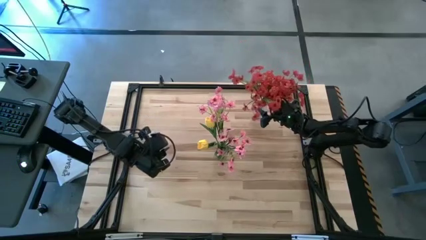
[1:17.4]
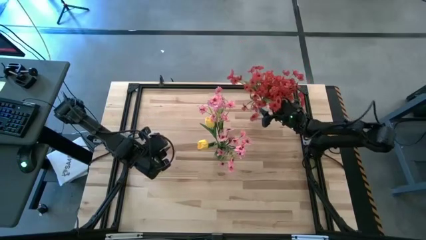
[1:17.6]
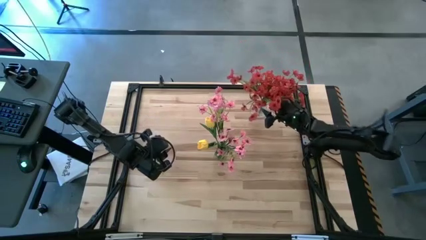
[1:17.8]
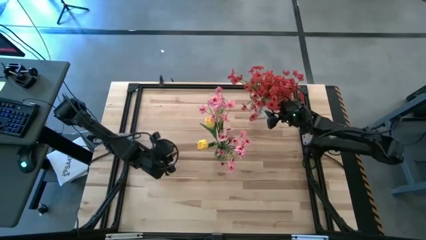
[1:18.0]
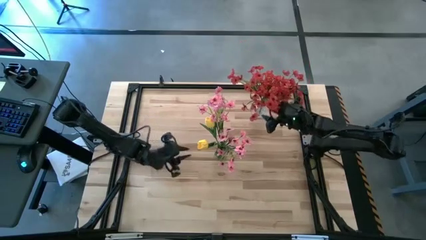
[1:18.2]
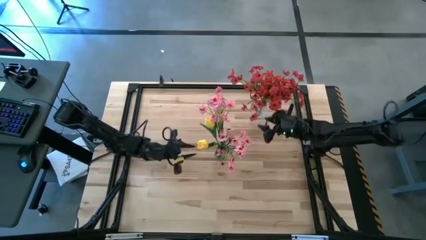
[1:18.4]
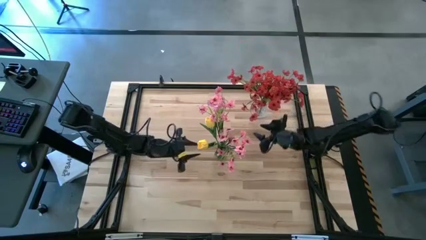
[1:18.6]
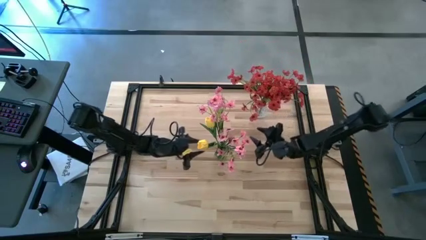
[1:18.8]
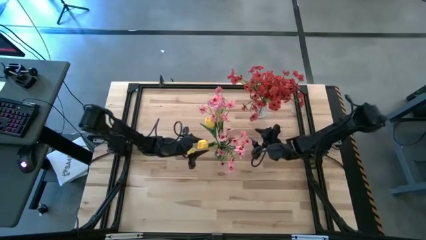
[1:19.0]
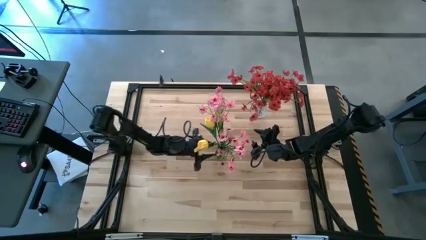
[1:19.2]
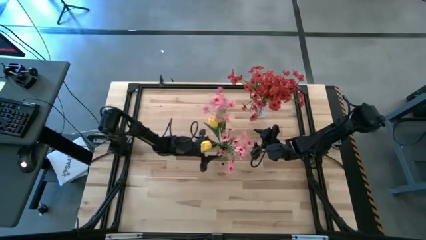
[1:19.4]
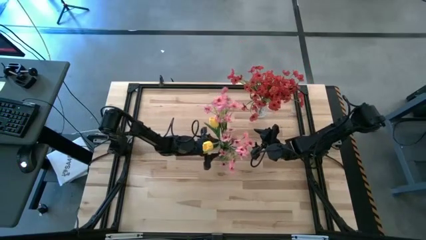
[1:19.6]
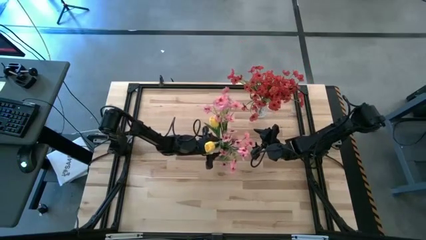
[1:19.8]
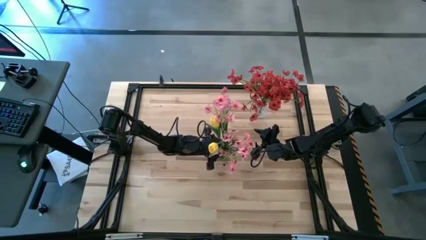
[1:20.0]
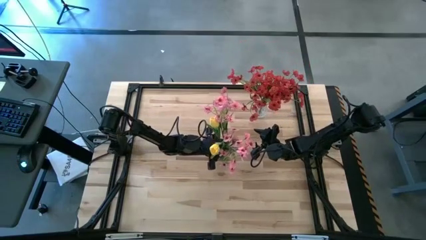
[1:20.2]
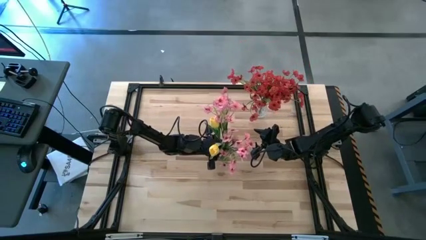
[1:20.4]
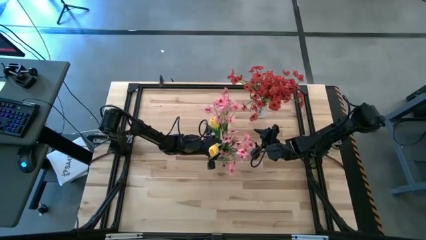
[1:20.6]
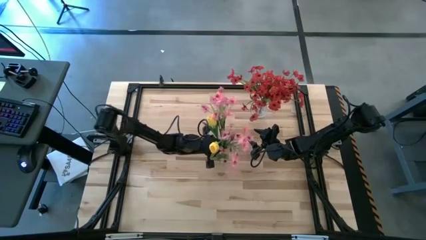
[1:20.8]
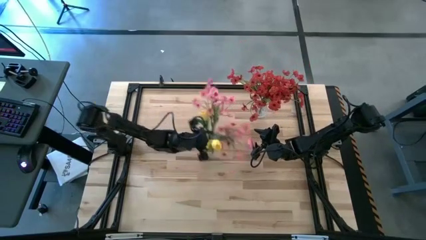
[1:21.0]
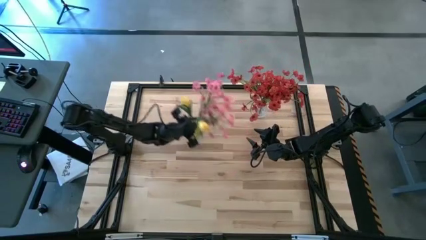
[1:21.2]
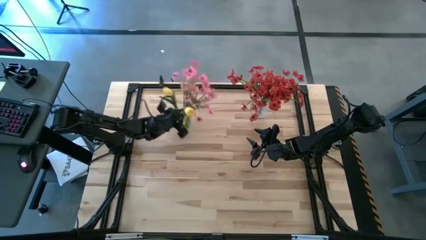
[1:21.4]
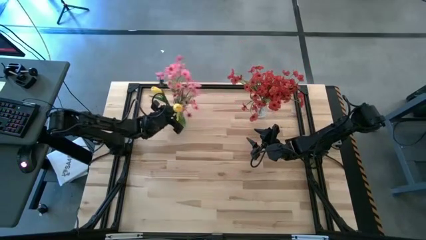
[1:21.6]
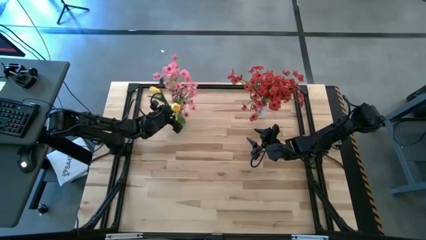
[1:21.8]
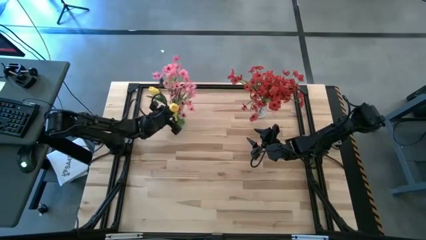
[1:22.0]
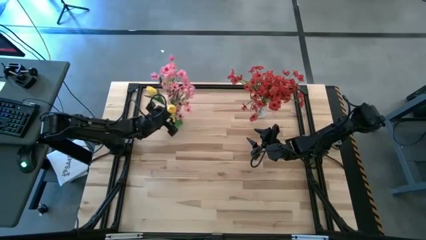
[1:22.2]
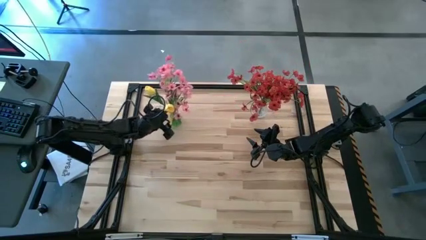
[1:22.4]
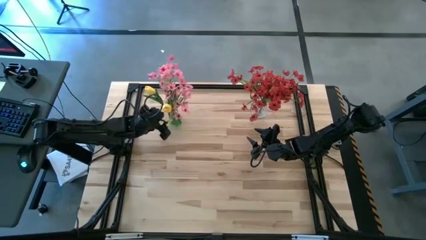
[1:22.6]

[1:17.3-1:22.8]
Task: Sort flowers into vase by color
Move the green vase to the top right of the table

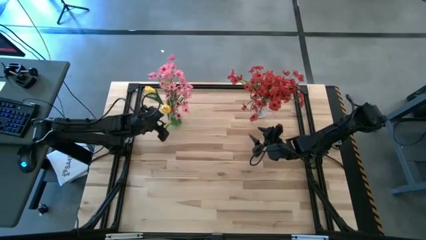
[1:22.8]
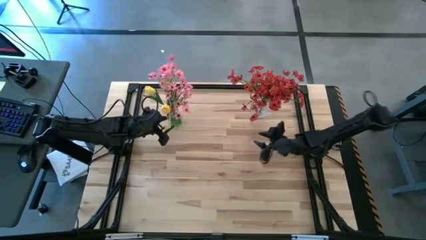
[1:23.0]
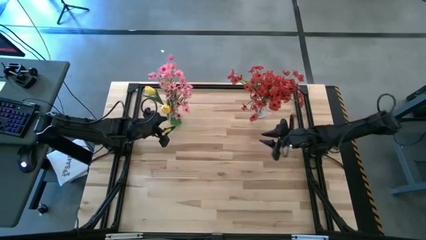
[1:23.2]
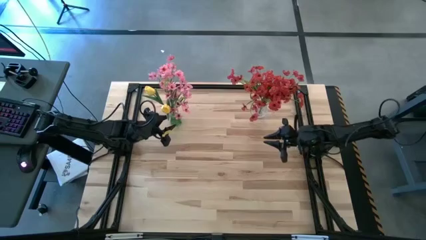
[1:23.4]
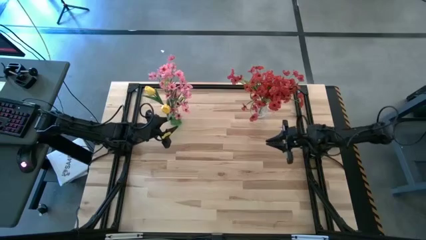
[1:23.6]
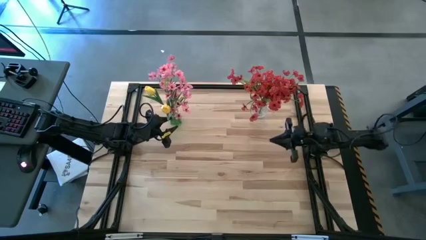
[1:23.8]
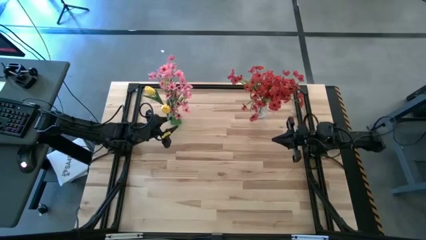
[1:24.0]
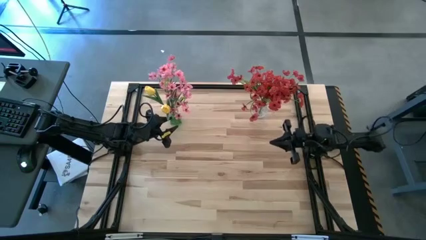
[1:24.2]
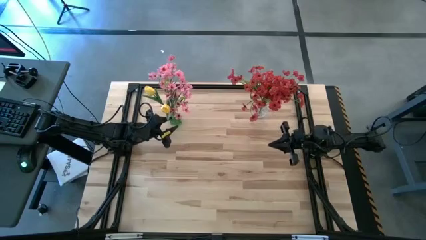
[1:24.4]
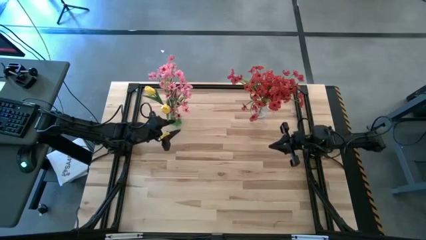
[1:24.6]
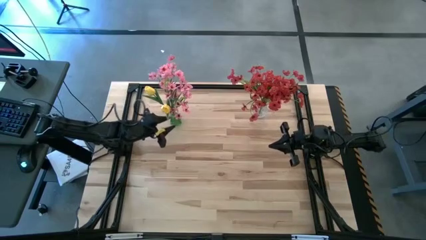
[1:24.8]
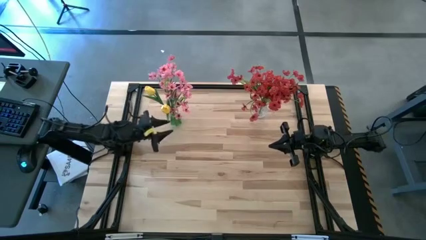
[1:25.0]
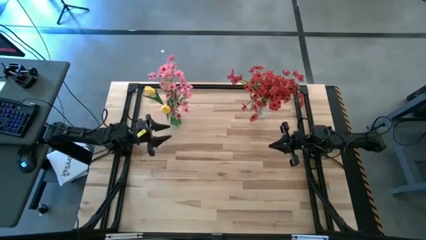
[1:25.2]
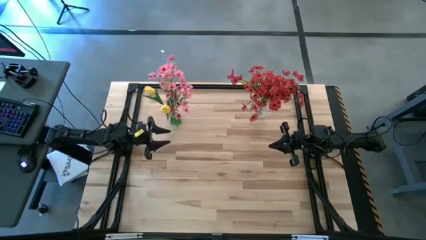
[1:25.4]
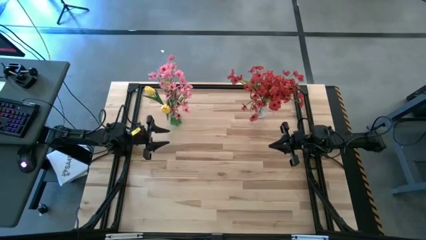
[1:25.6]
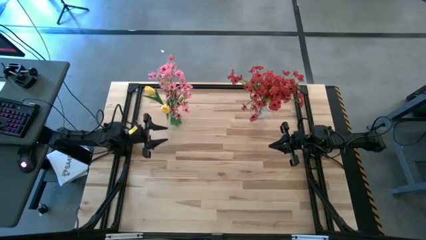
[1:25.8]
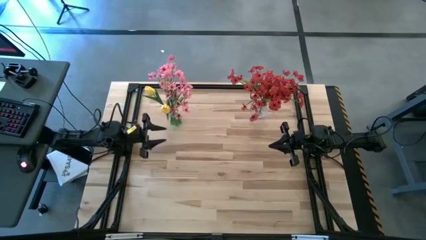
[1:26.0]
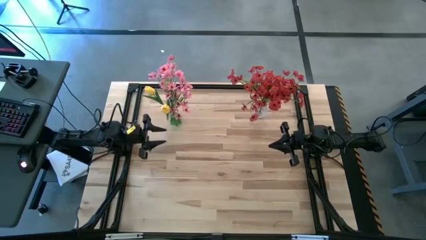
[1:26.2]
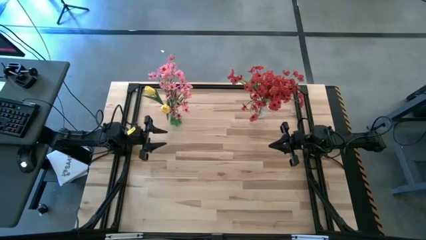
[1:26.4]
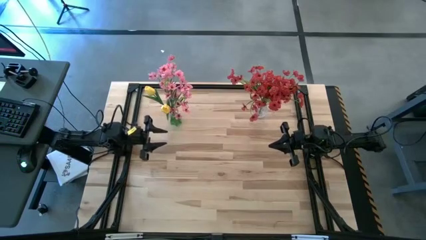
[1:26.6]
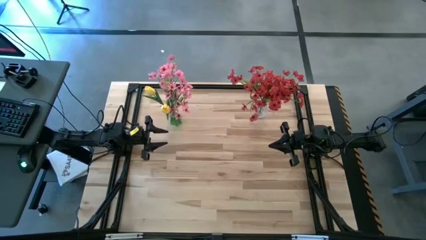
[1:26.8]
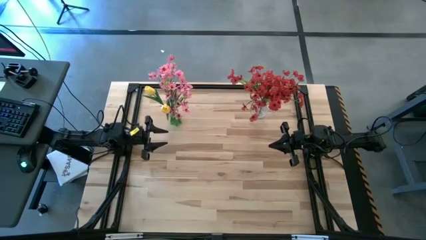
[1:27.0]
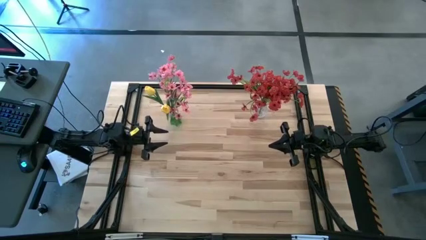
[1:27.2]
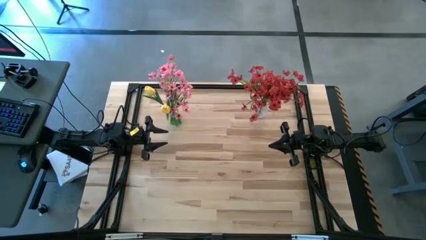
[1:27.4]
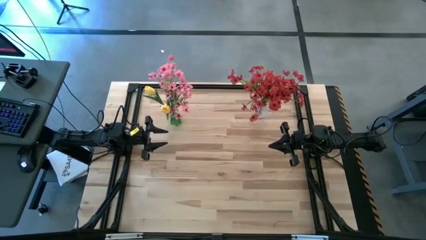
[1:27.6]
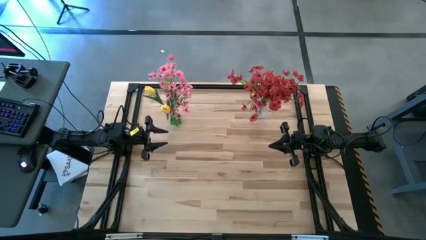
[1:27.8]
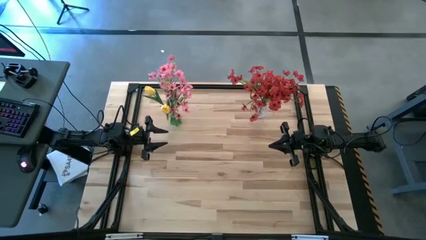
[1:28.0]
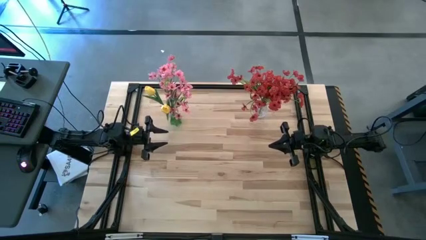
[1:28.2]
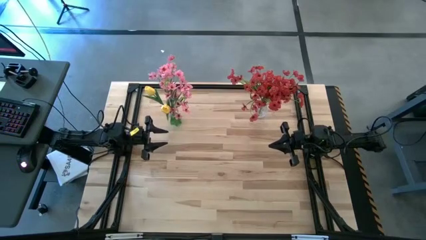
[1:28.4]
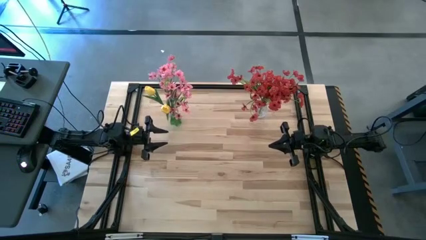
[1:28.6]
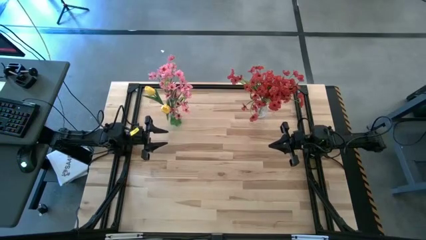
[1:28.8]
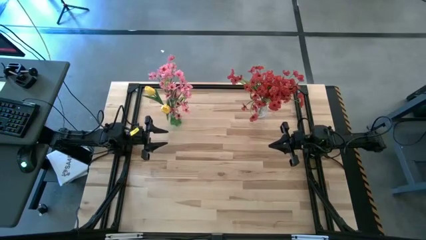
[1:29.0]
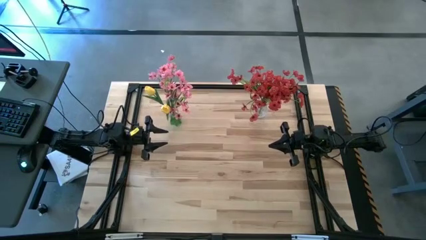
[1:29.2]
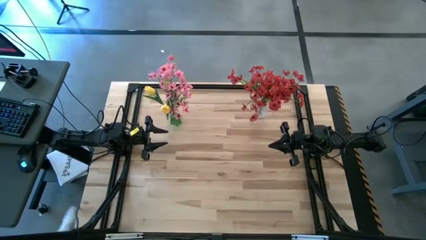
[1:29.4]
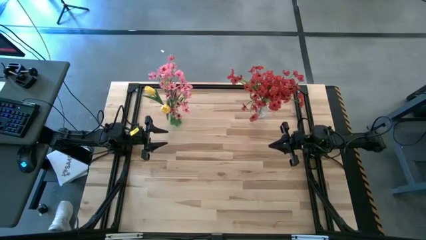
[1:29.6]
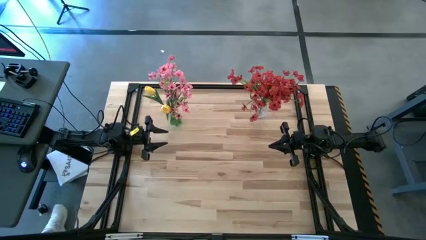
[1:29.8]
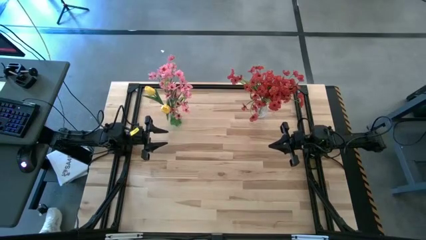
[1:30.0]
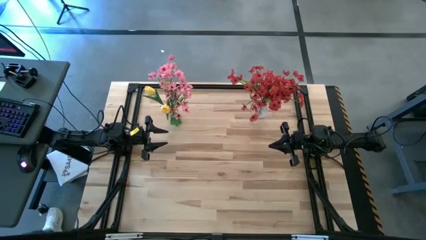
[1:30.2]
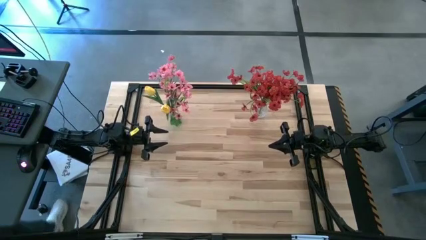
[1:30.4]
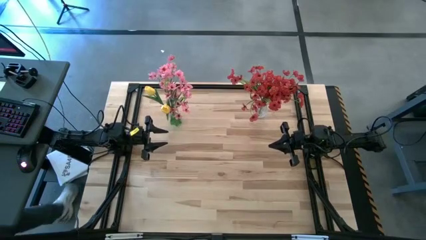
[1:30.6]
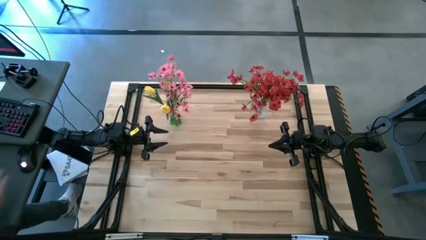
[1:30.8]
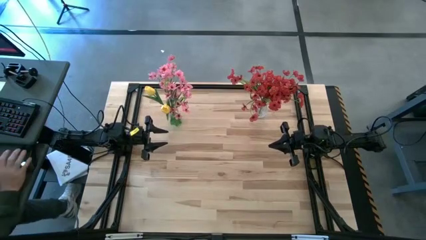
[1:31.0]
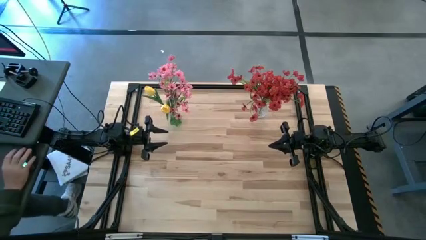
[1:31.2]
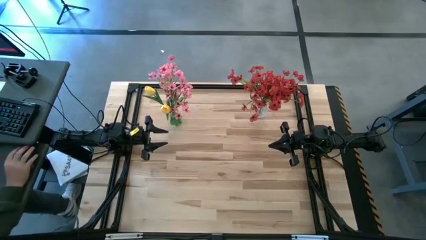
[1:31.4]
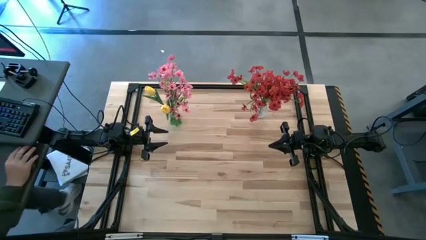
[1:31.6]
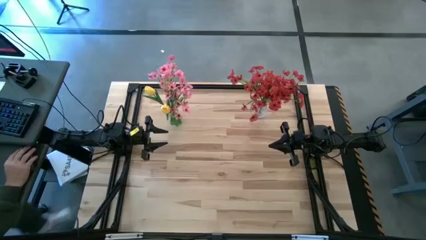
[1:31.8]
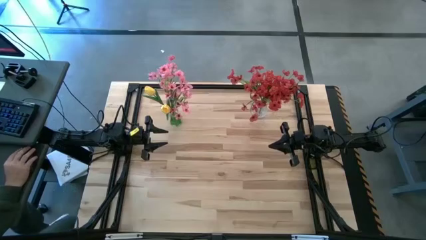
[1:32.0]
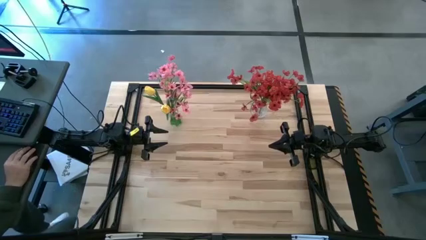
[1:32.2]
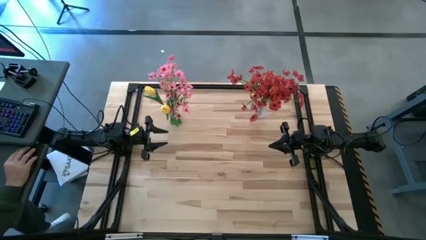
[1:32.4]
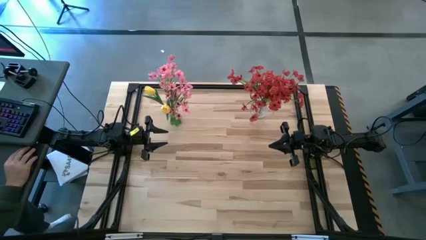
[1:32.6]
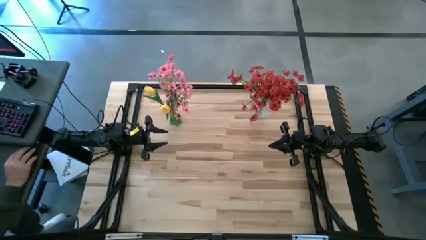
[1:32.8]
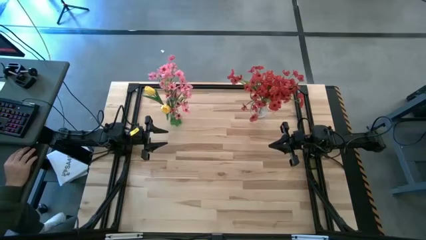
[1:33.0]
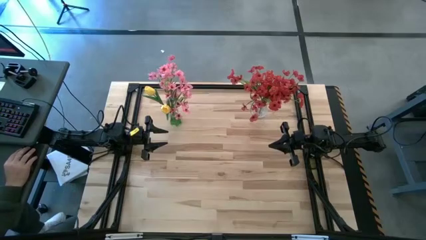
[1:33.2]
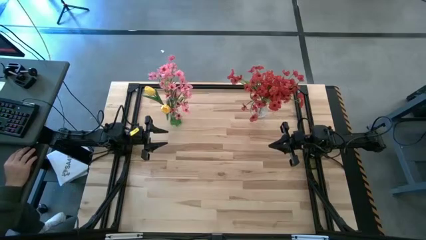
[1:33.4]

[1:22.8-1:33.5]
Return to home position

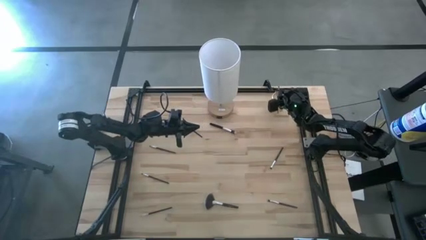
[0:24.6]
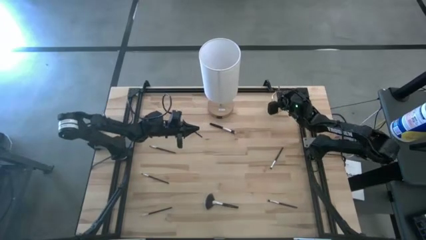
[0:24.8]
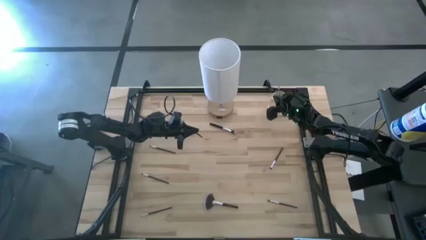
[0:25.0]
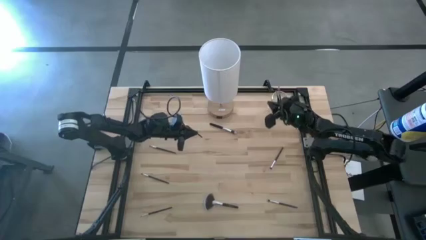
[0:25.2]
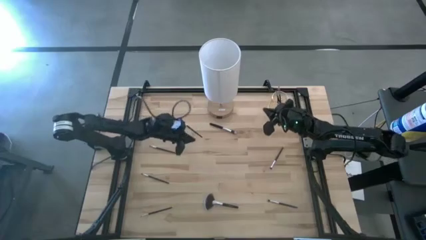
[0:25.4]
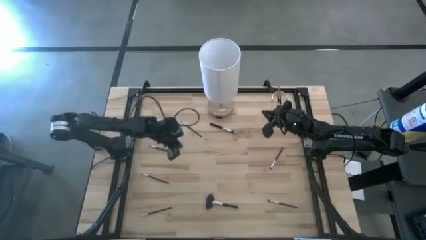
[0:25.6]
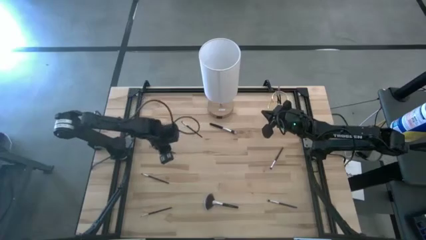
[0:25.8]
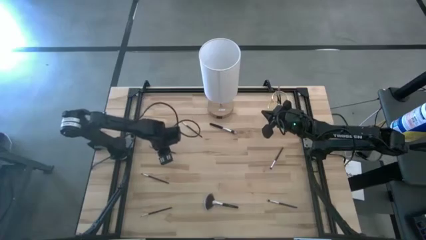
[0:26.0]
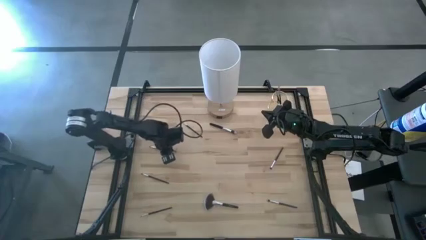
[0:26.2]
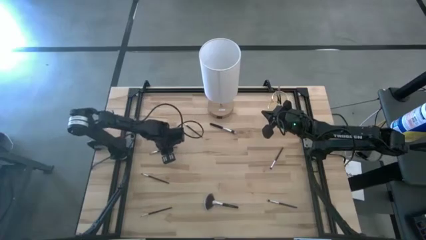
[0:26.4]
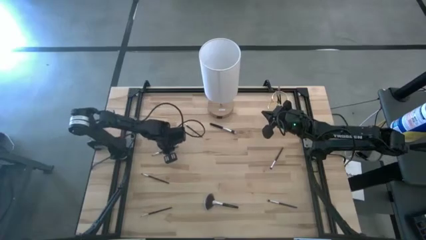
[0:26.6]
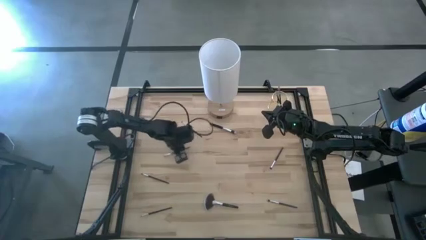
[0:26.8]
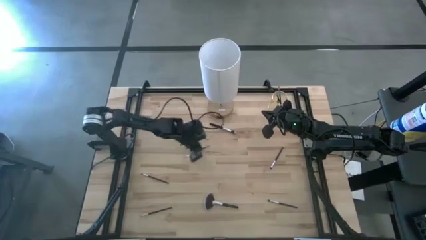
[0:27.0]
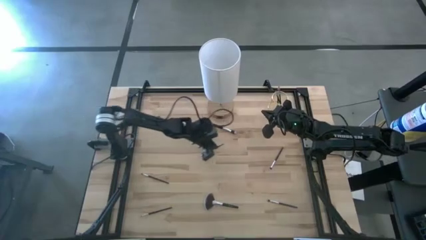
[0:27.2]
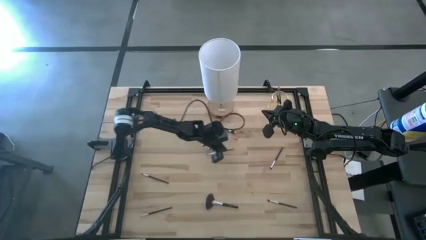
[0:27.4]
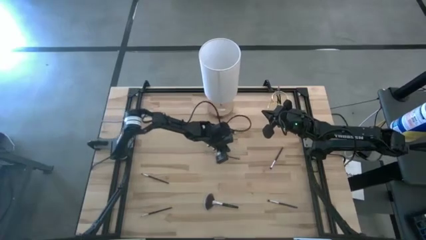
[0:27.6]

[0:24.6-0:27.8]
Task: Pick & Place Makeup Brushes
Put the eyeshadow brush into the makeup brush holder
